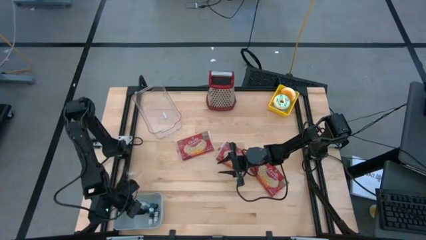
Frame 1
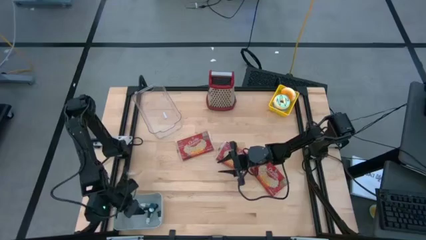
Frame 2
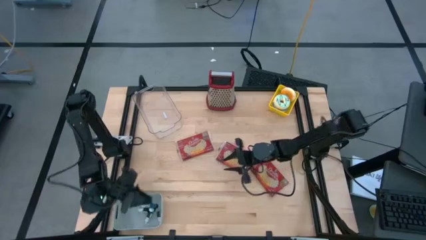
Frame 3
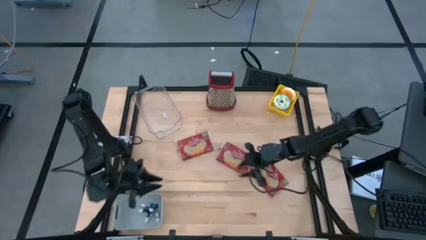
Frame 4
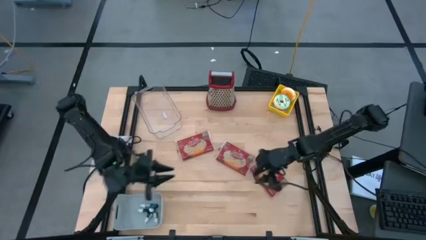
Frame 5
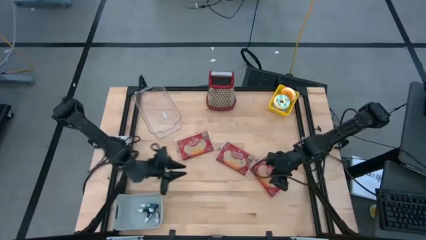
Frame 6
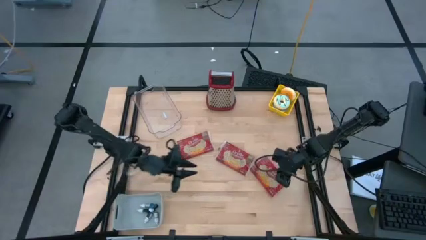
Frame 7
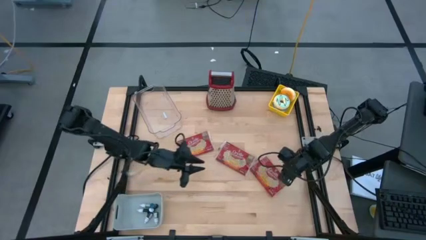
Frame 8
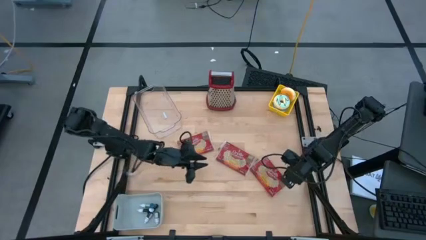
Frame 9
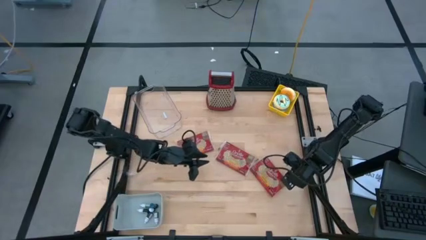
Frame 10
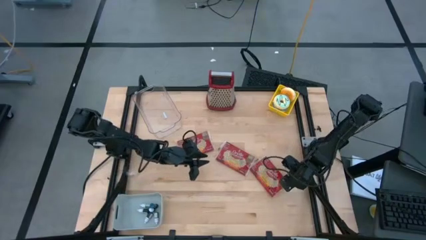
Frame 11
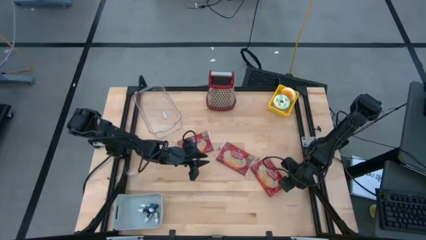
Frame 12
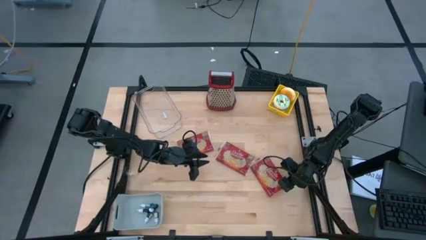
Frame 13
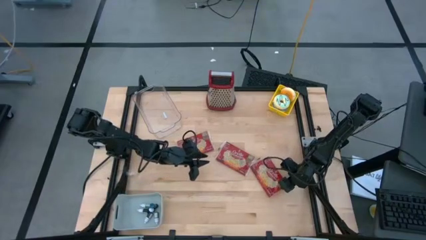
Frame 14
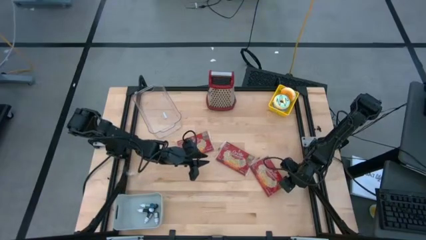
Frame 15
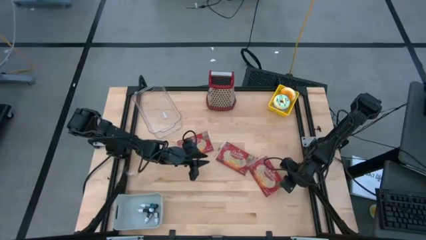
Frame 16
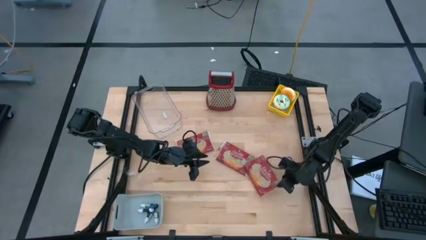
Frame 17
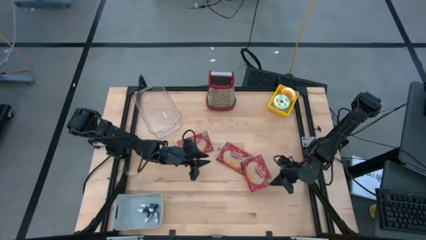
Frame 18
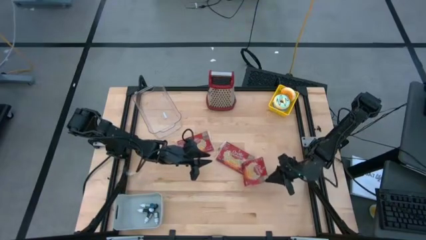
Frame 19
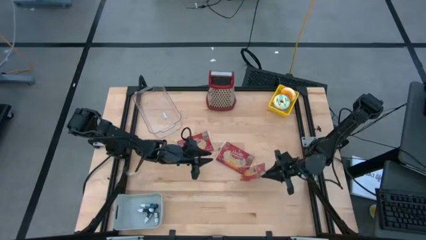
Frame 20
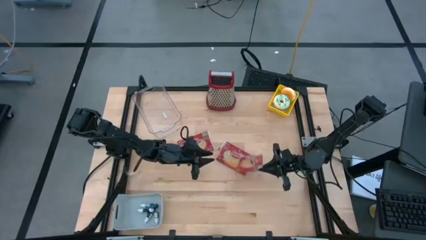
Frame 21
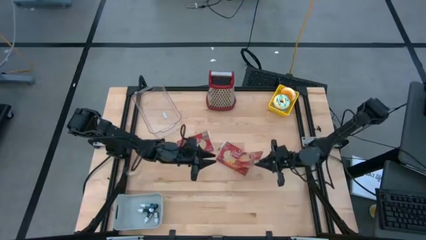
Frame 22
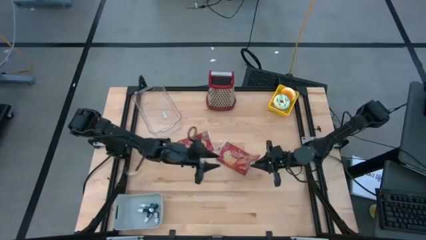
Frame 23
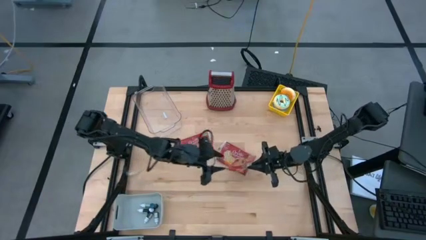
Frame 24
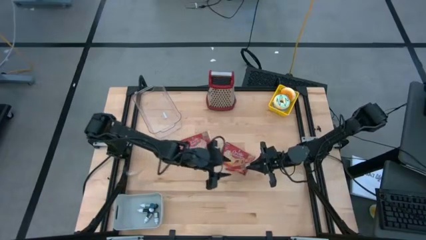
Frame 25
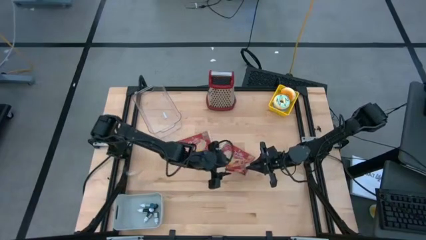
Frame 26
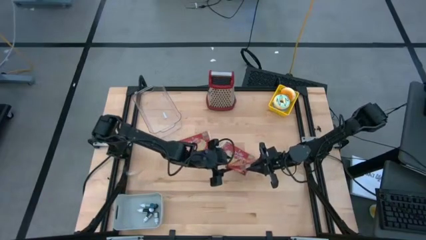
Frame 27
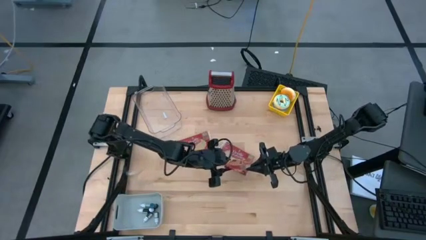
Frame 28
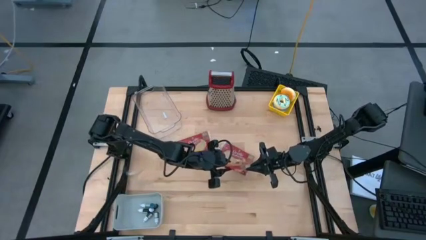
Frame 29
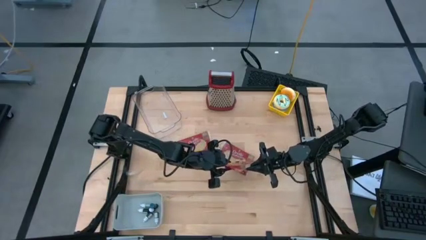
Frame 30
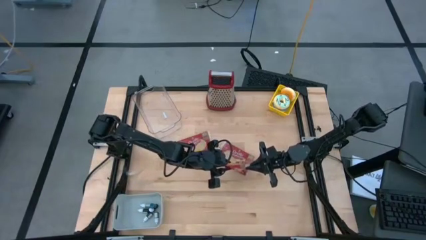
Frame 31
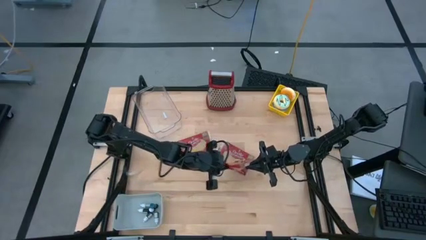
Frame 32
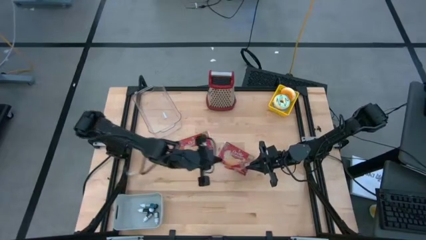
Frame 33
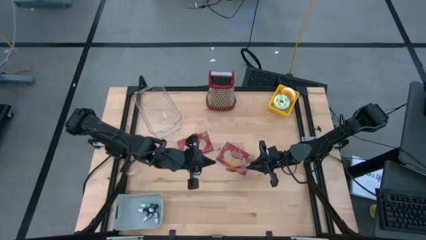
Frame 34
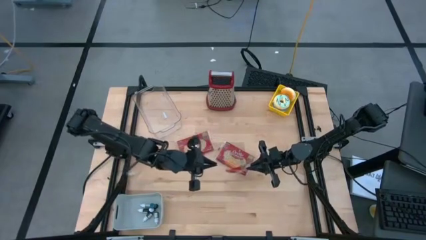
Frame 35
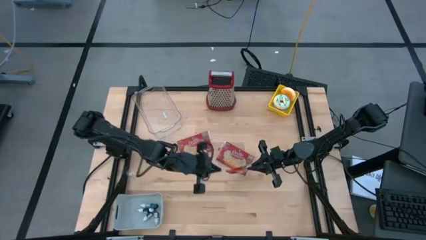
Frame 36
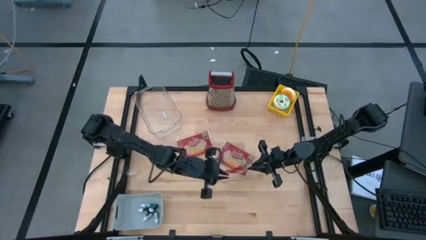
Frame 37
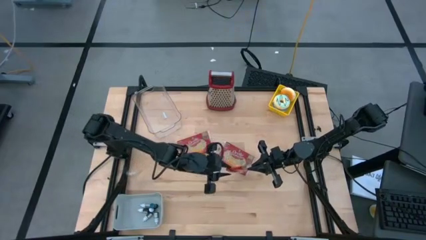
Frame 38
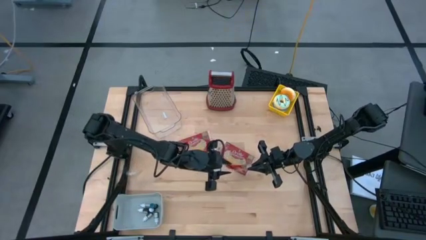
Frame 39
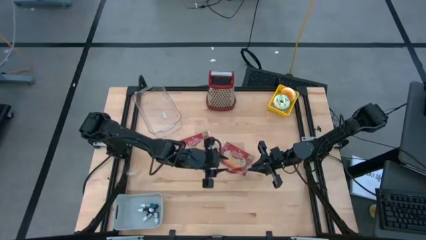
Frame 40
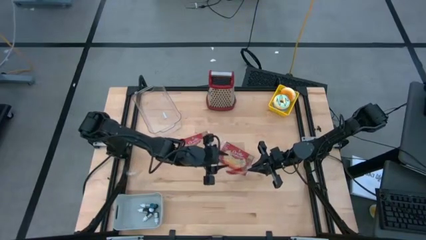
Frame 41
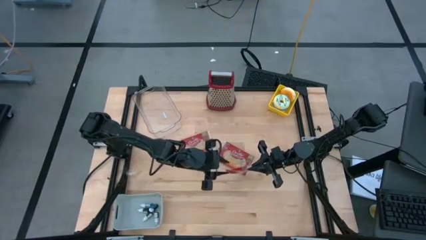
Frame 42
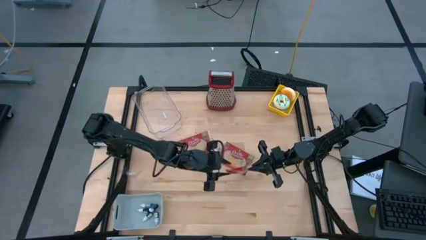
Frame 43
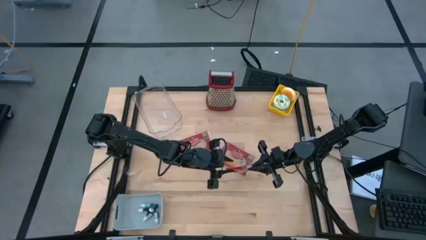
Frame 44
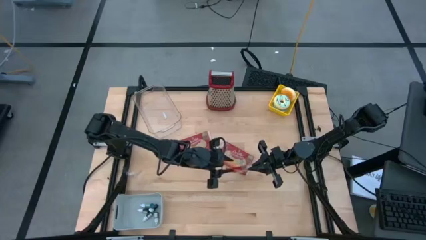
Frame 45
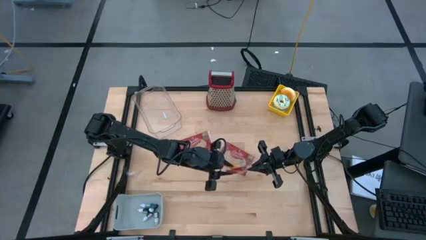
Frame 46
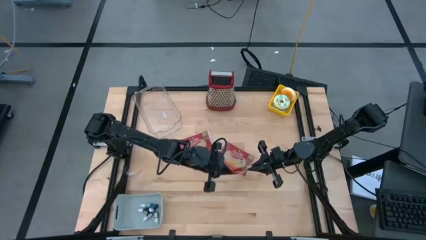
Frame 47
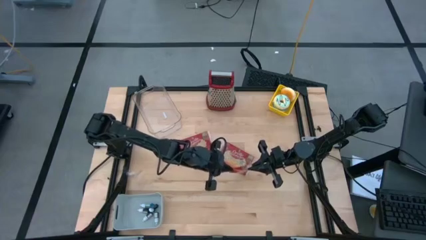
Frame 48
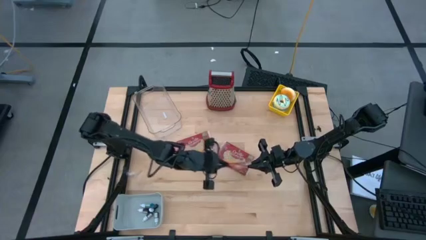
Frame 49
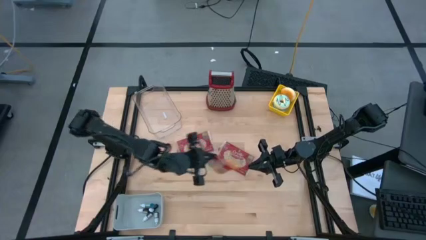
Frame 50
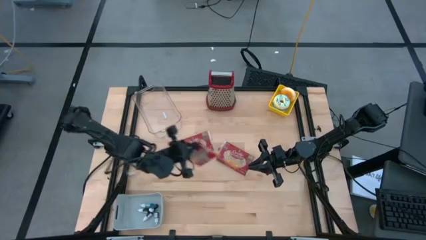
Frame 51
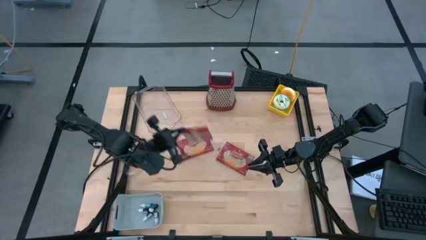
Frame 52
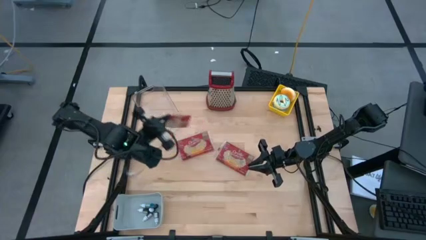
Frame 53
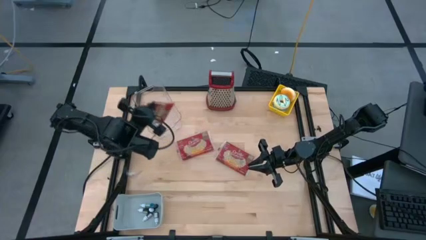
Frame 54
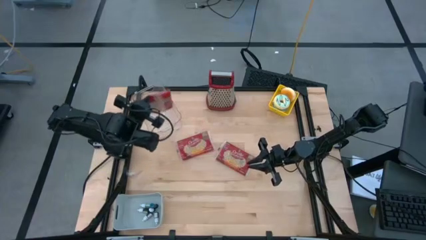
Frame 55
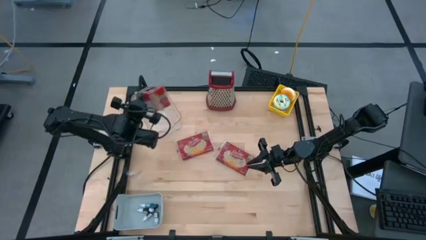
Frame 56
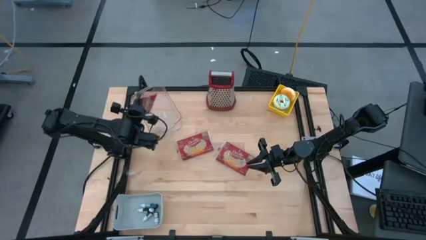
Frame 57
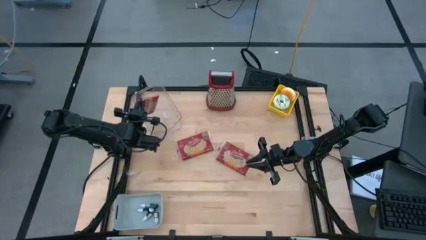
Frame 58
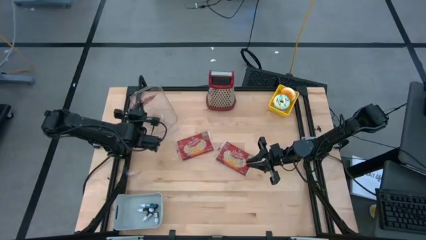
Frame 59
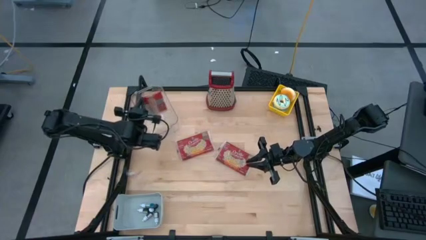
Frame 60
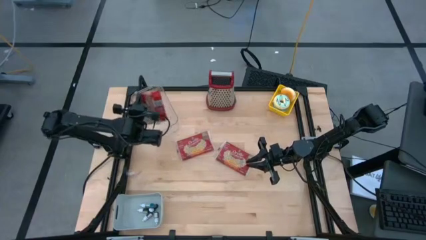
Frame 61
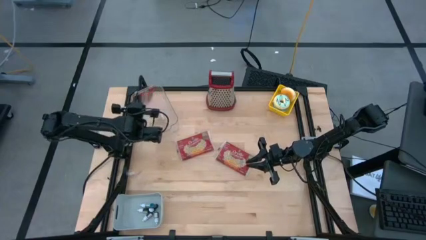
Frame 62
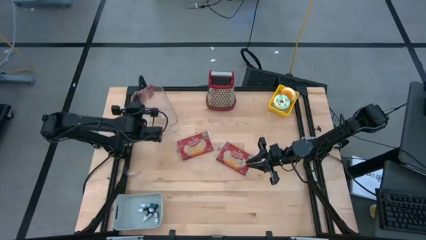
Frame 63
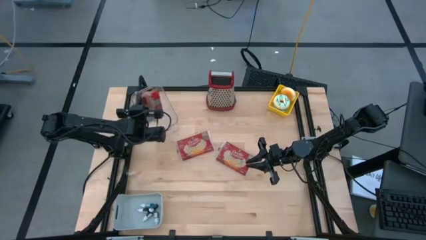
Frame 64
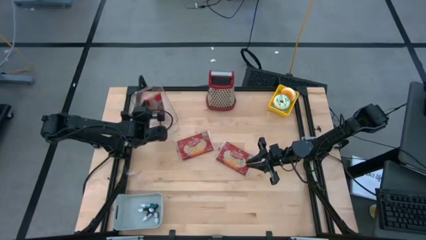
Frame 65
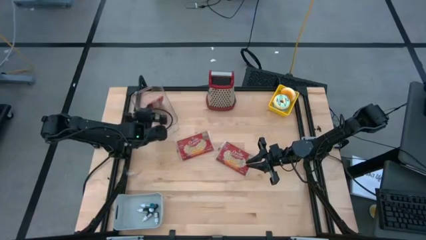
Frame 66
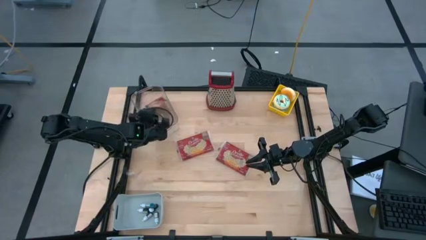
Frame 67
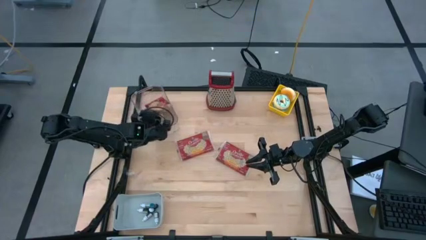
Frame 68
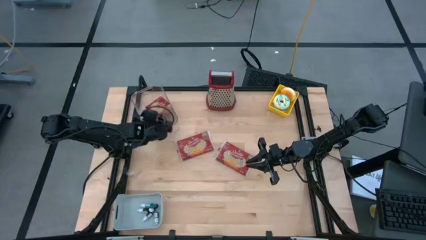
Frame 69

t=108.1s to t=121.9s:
Put the bottom right red popcorn bag into the transparent bin
